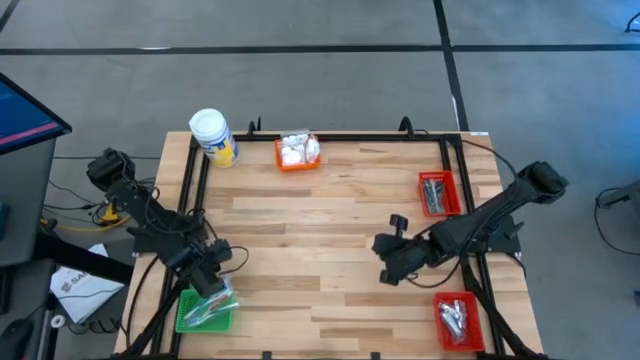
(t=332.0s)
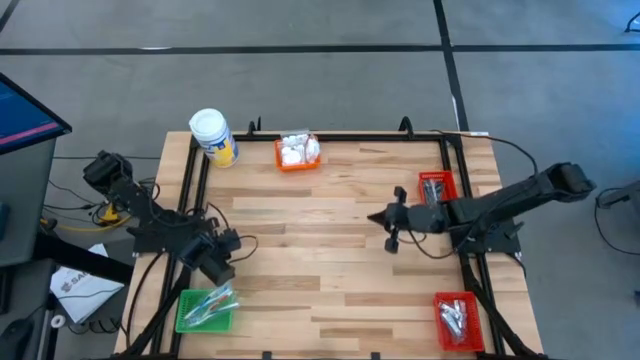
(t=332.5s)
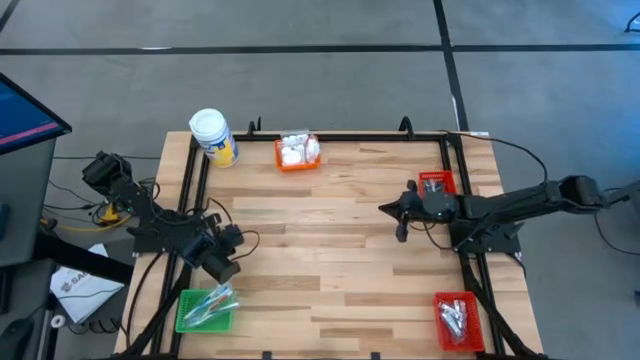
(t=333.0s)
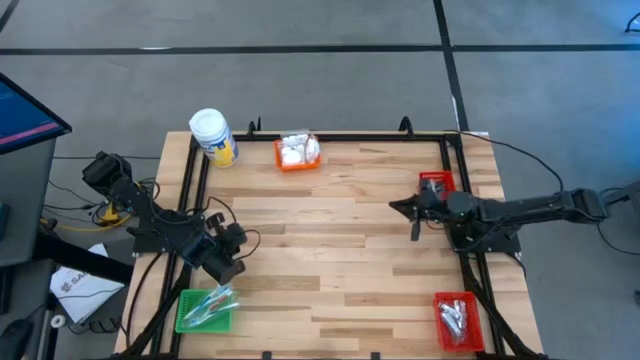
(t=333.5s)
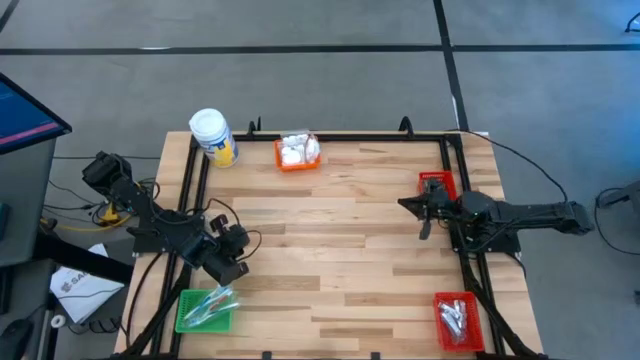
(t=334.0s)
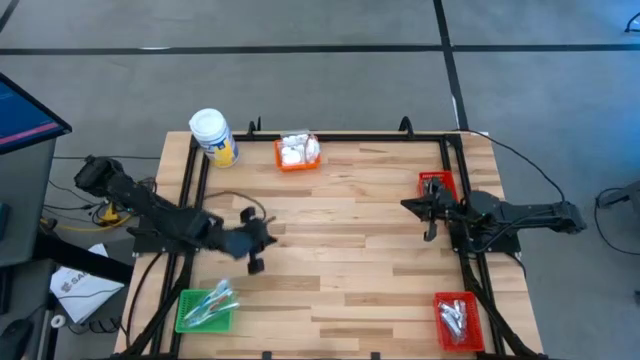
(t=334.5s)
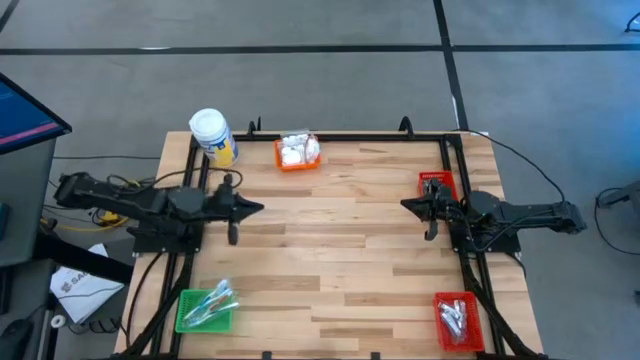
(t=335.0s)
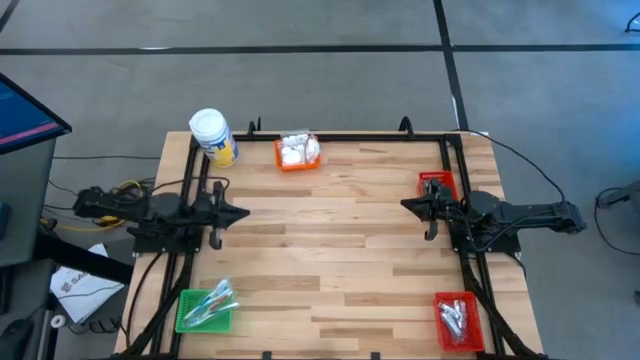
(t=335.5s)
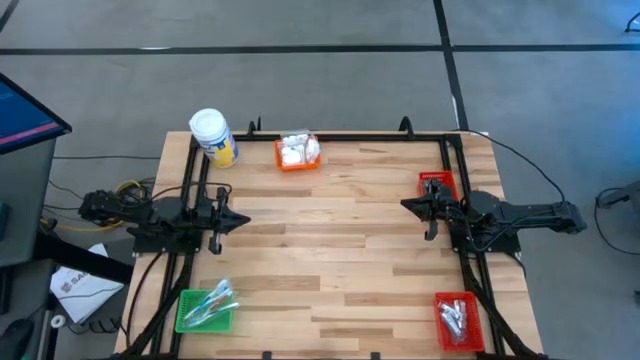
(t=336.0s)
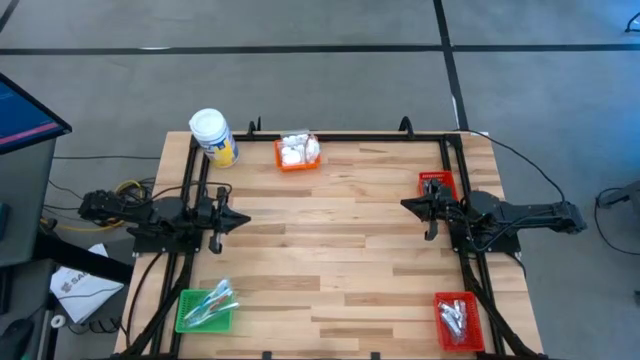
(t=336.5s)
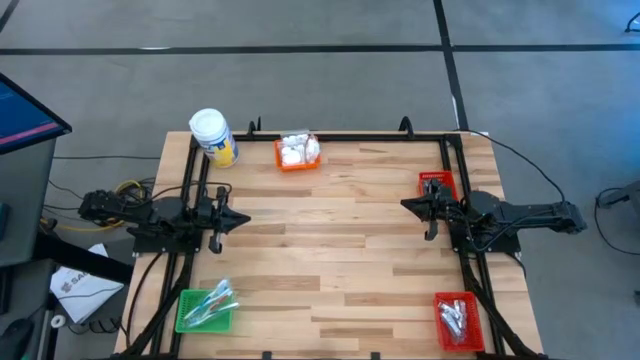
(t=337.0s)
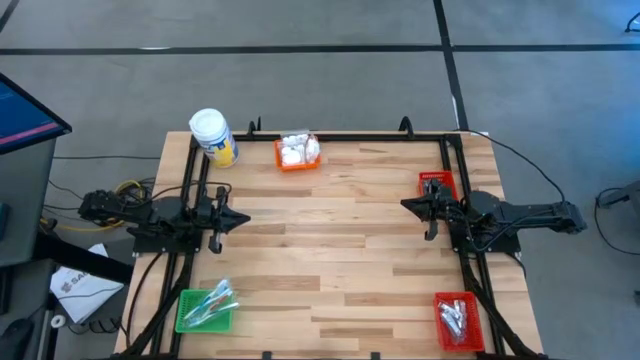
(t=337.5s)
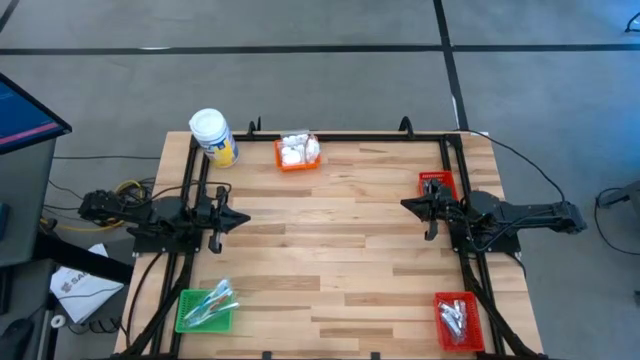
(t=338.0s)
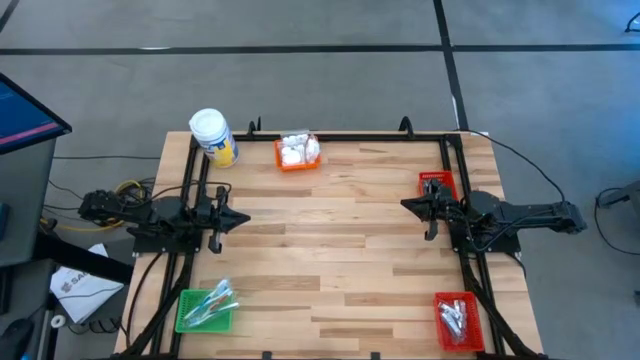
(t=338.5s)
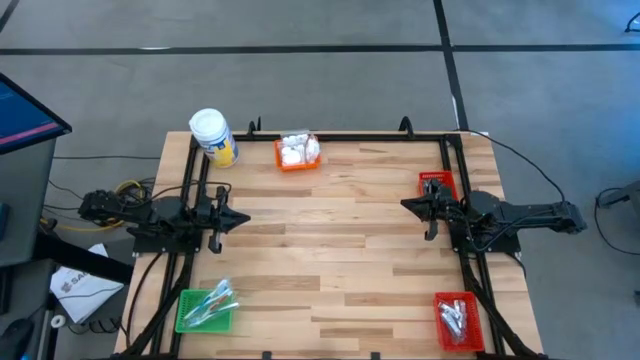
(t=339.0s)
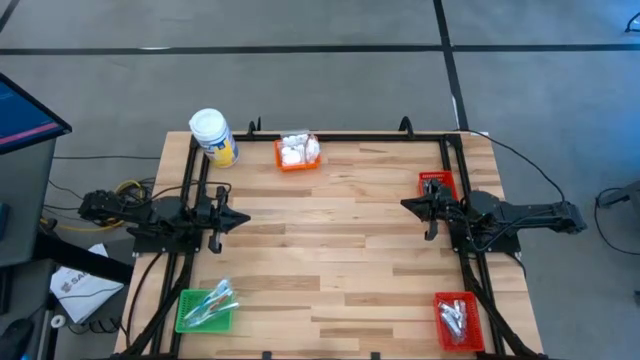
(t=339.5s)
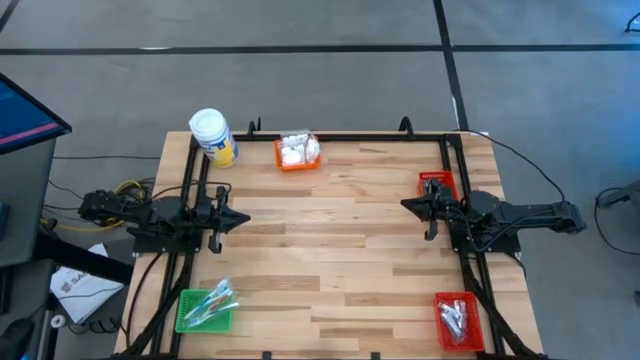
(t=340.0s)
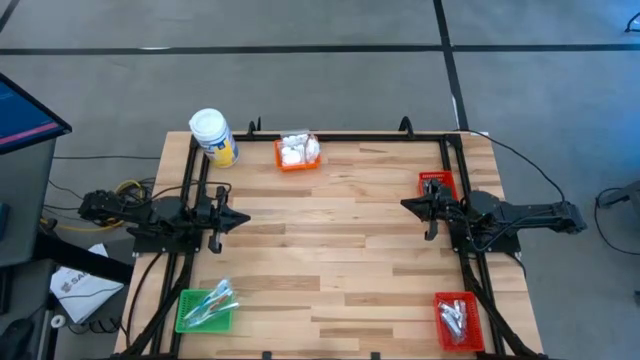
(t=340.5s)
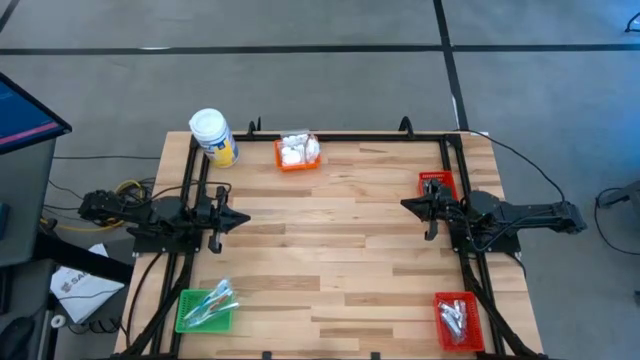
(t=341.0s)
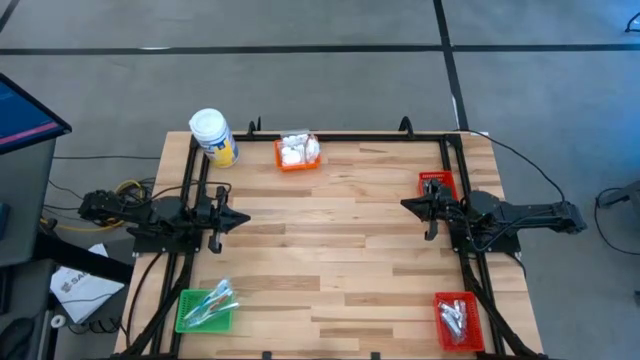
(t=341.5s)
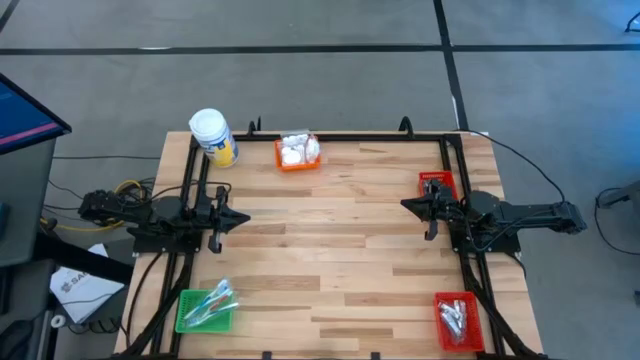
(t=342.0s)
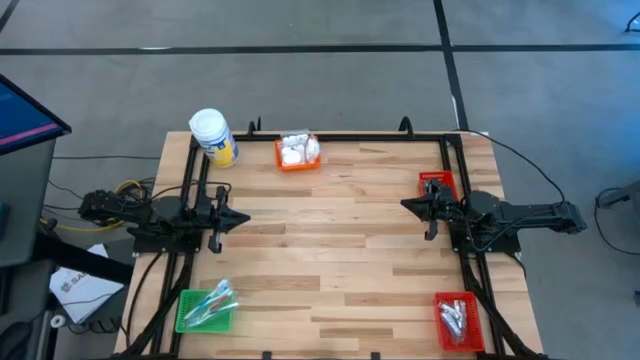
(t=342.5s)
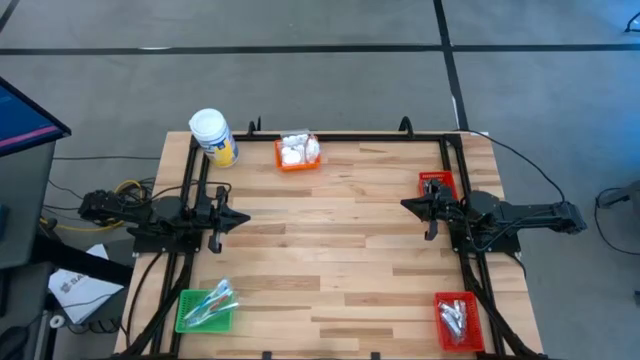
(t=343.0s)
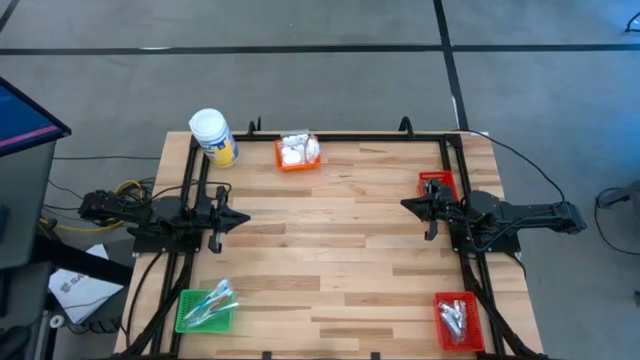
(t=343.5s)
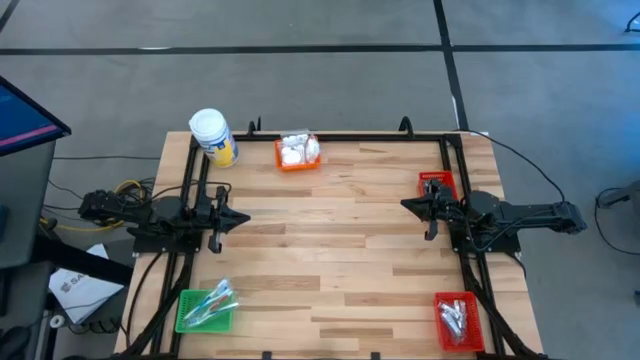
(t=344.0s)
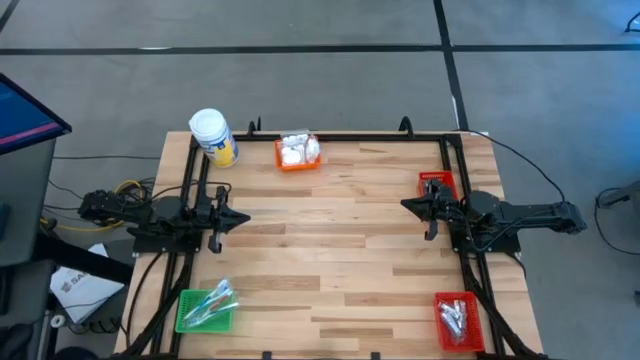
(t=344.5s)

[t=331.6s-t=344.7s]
Task: Pick & Place Travel size toiletries
Return to Home Position

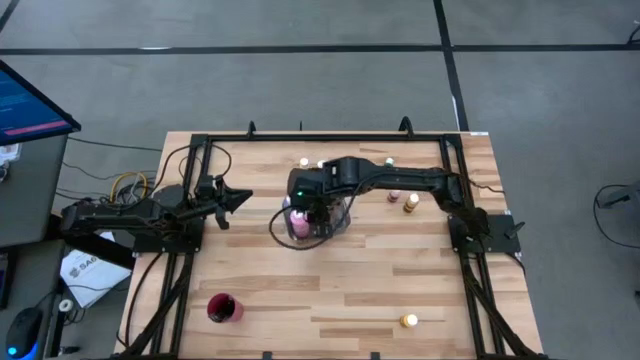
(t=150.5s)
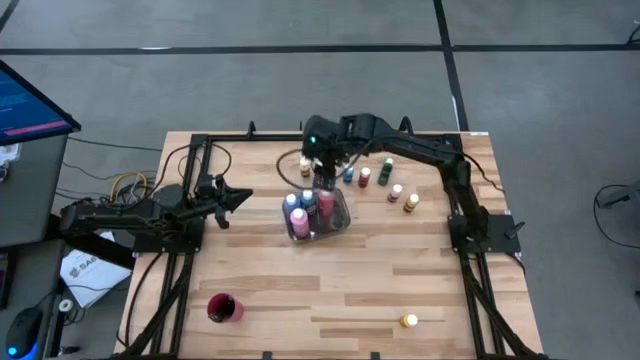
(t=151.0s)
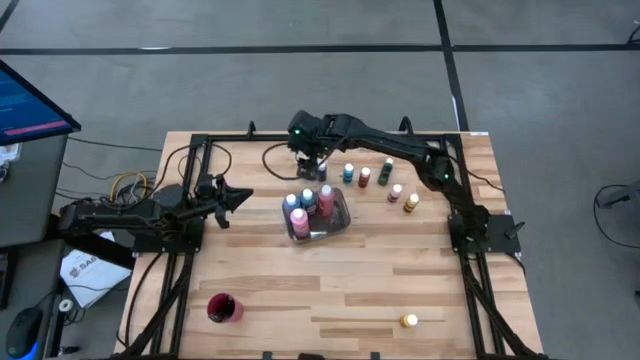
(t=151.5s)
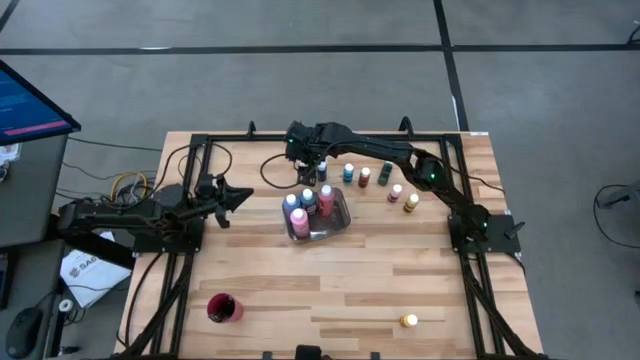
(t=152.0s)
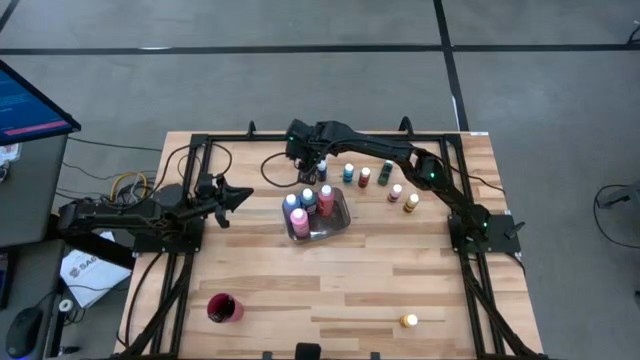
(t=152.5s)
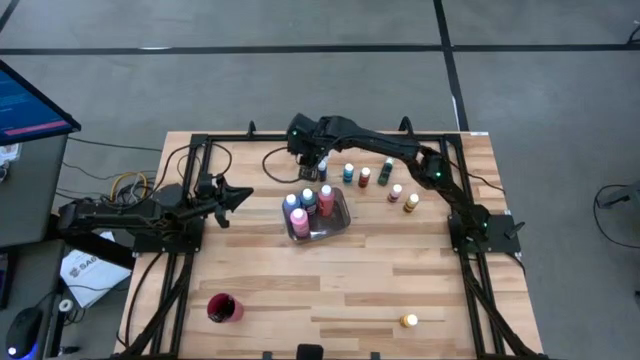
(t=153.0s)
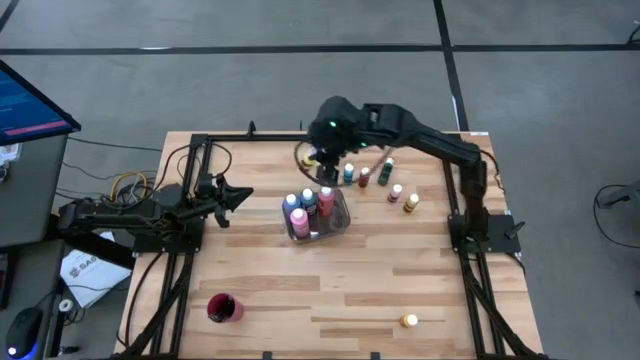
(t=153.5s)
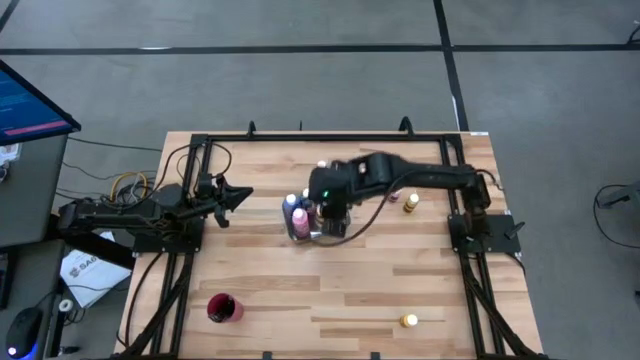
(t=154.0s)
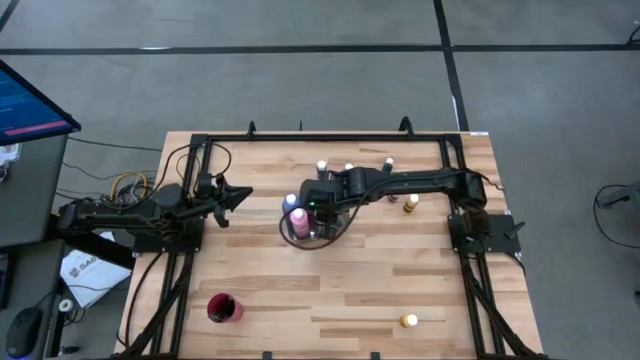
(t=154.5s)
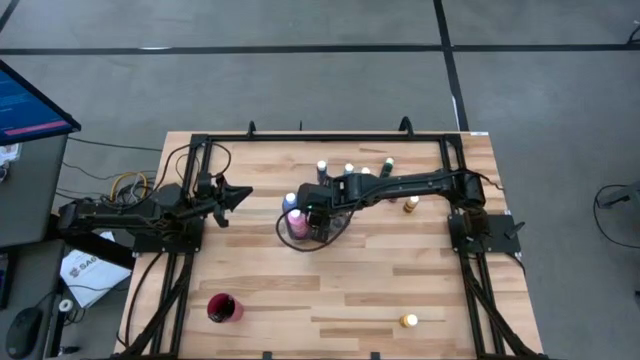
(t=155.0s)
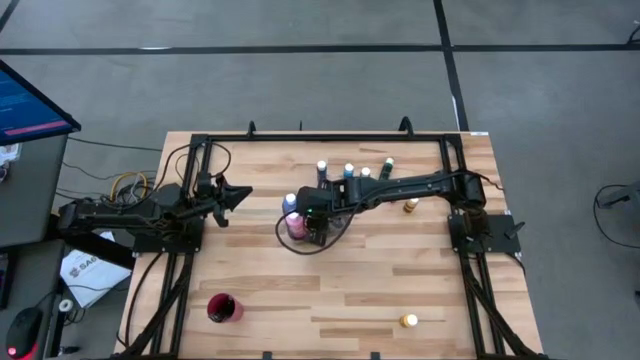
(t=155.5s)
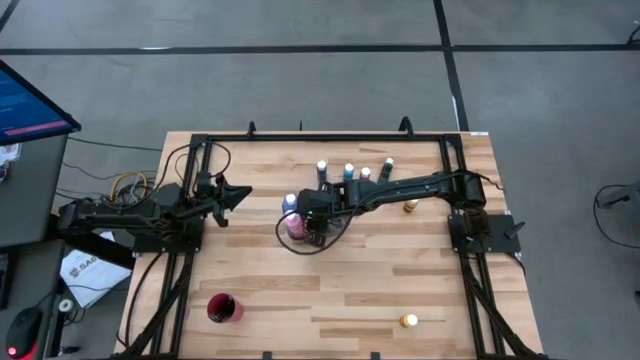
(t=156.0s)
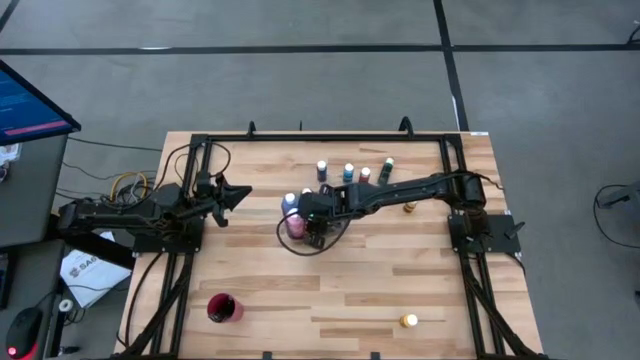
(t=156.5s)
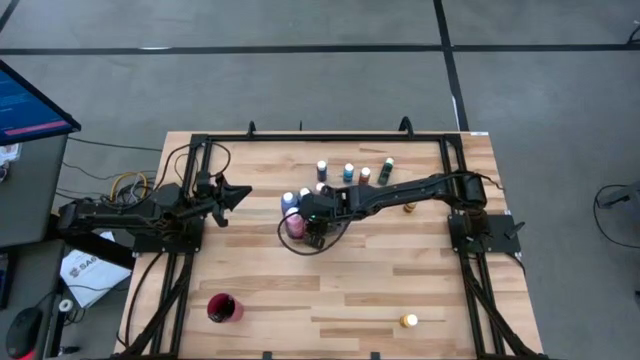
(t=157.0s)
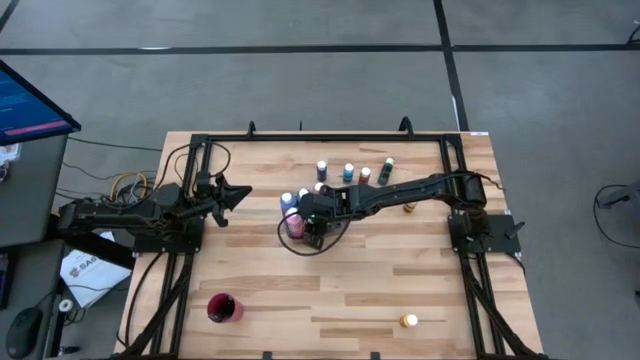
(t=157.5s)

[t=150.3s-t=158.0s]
Task: Pick & Place Paint Supplies
Put the small yellow paint bottle into the black bin
